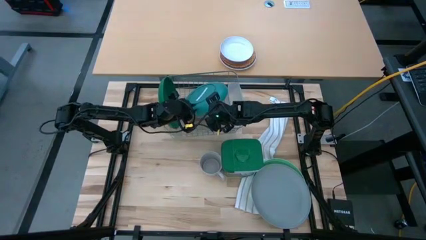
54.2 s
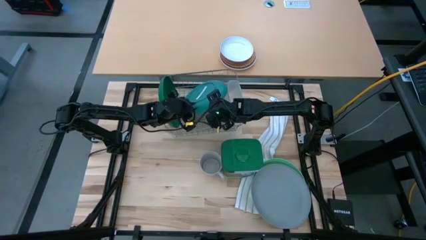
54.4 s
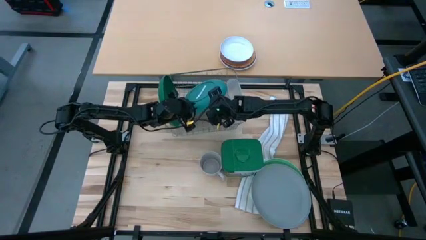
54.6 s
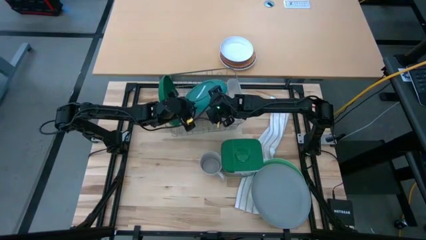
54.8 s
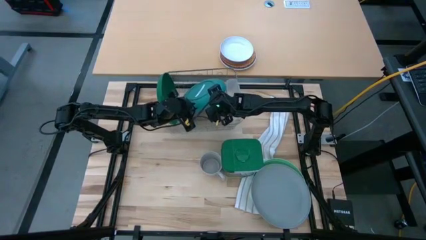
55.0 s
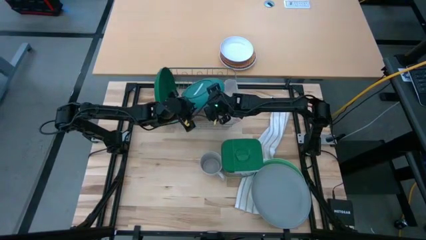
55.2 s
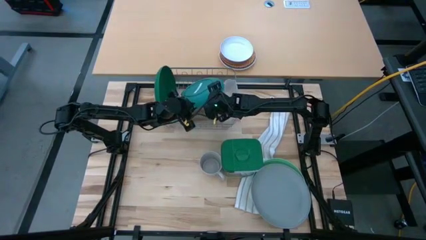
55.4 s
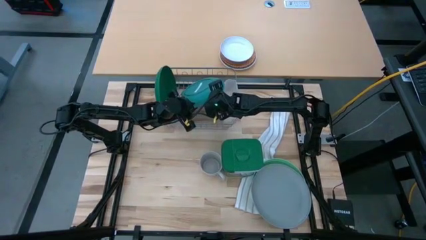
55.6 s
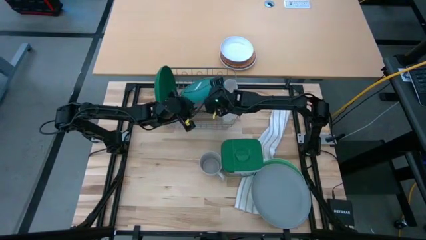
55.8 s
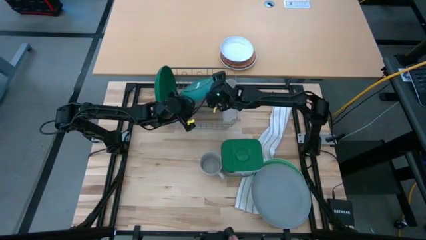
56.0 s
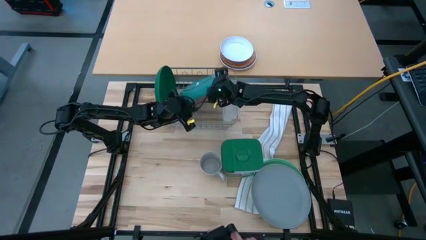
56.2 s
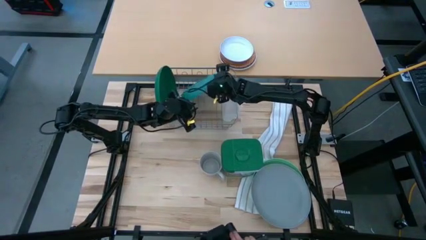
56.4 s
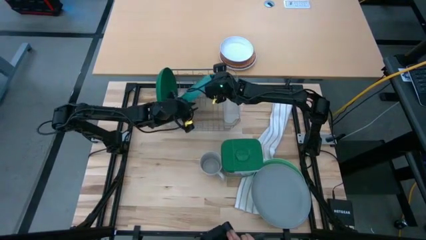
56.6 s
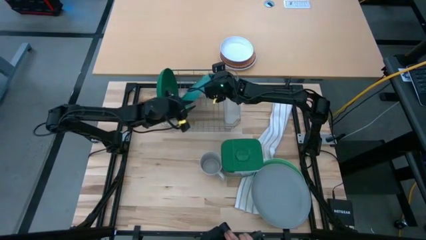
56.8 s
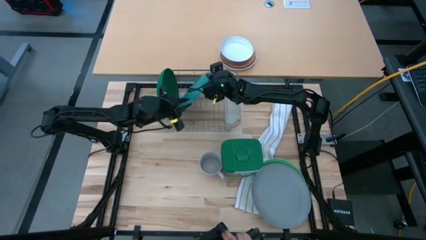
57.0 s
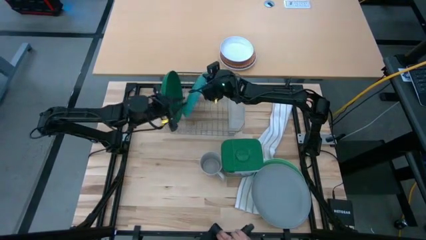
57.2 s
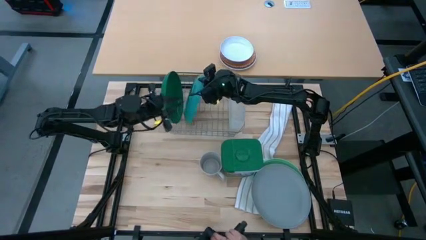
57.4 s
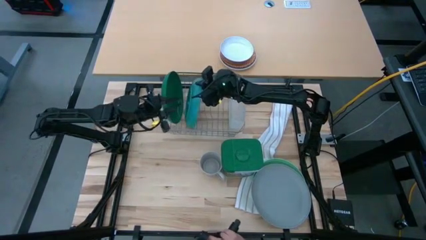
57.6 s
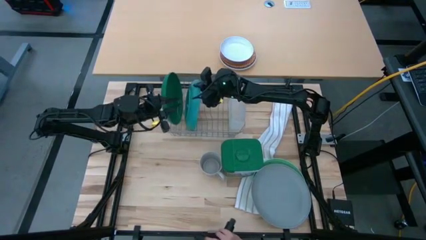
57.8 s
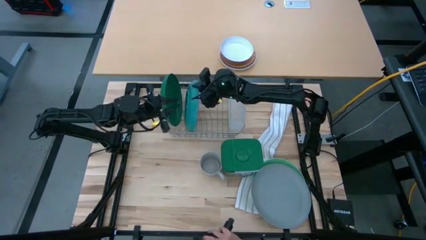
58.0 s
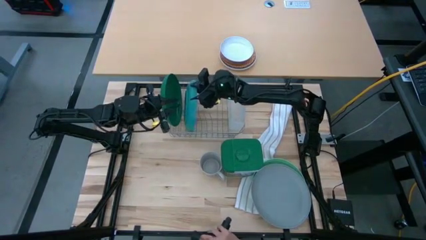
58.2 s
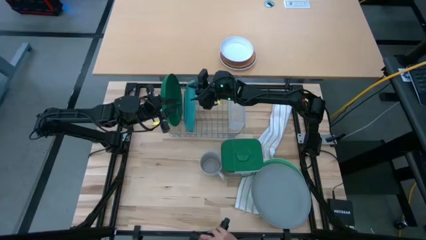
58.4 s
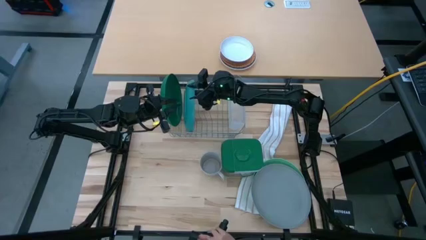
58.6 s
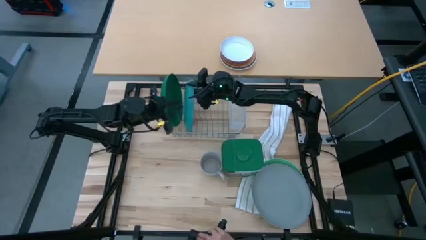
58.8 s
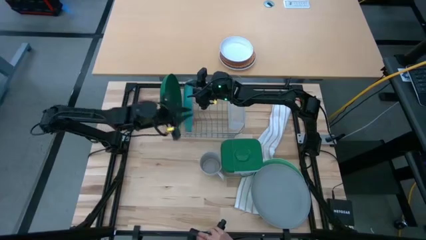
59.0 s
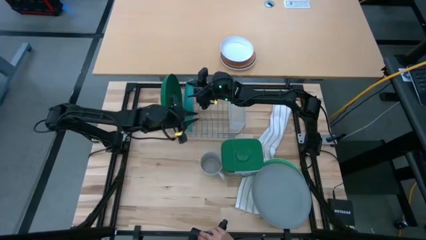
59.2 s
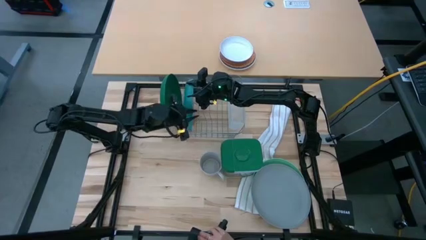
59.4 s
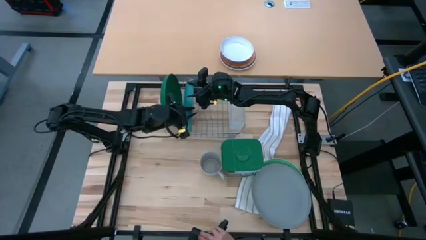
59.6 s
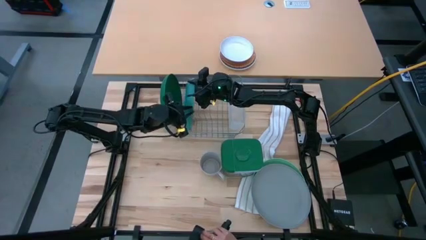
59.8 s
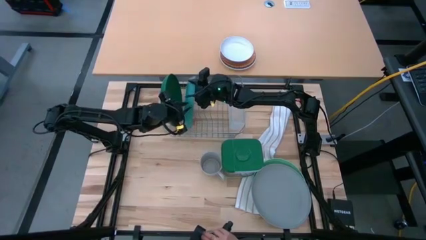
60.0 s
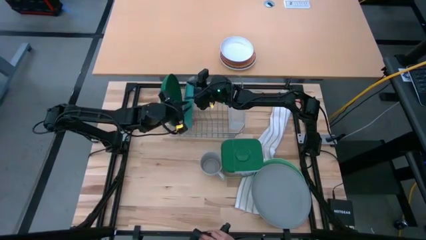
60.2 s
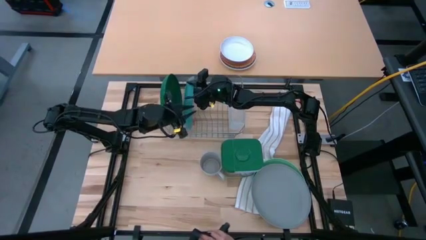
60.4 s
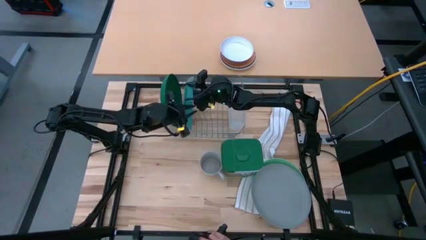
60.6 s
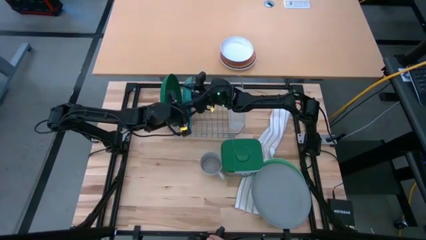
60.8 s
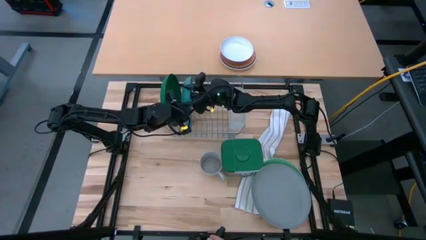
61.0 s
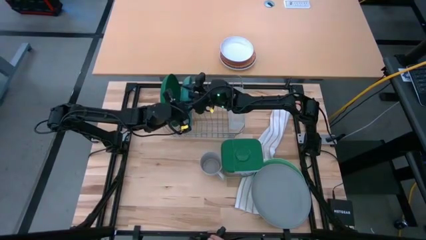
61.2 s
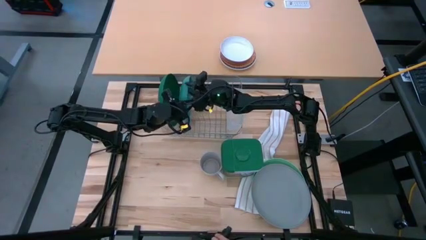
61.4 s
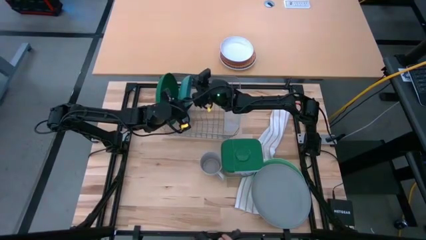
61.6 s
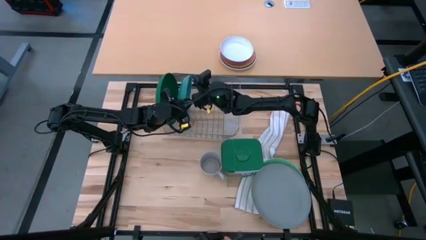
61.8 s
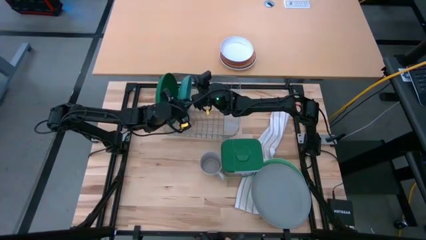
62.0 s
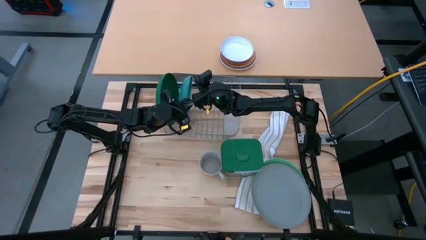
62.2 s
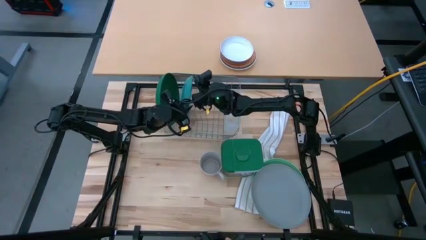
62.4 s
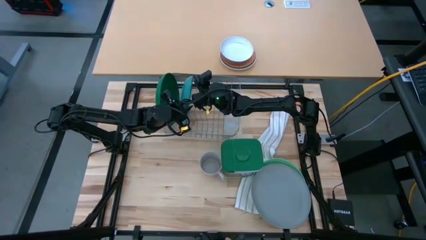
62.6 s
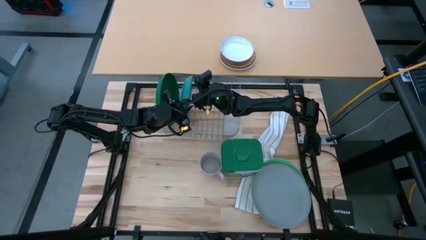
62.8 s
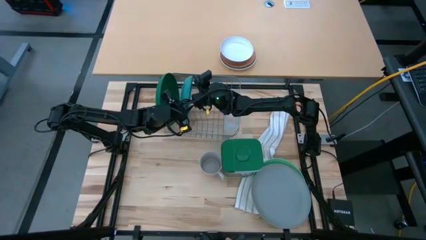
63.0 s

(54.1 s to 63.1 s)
Task: Sort dishes
Put the blue plate in the dish rack

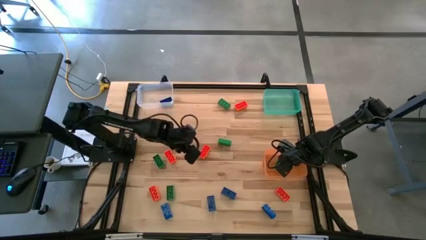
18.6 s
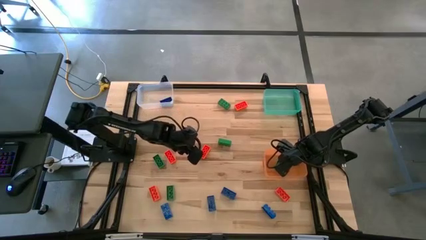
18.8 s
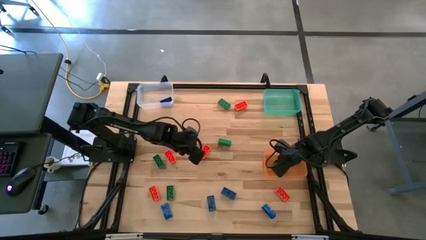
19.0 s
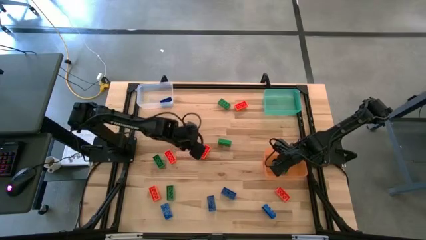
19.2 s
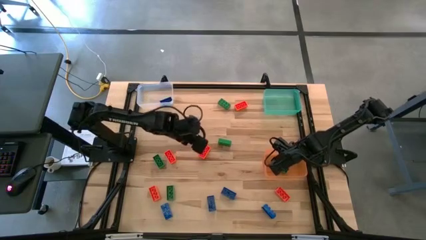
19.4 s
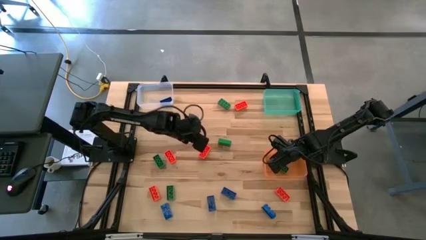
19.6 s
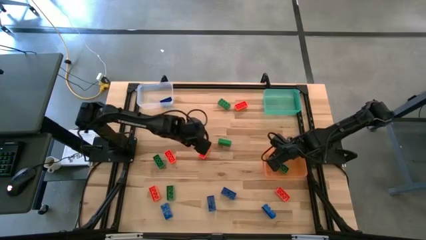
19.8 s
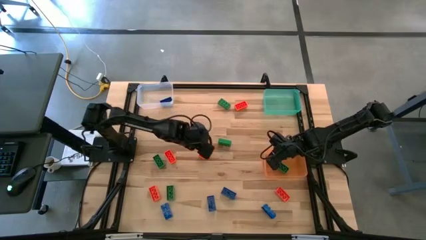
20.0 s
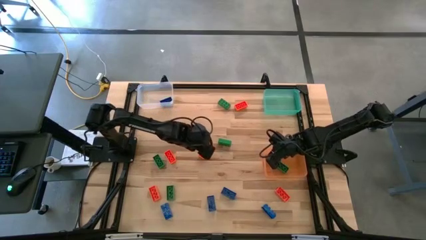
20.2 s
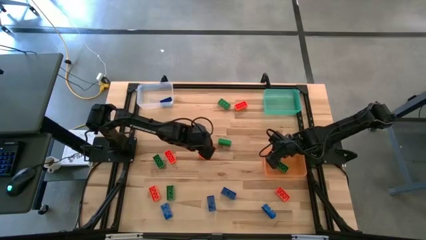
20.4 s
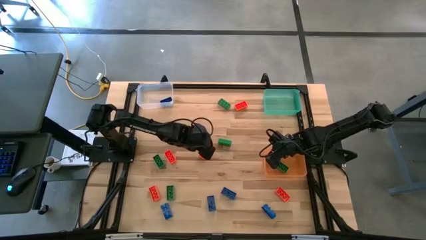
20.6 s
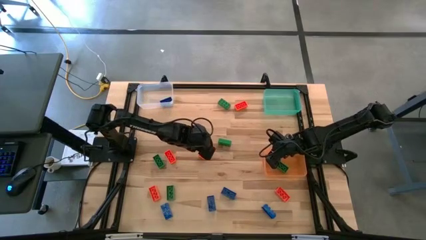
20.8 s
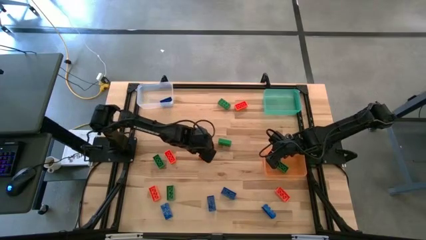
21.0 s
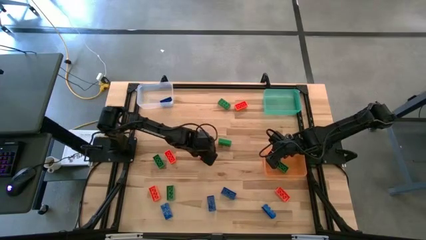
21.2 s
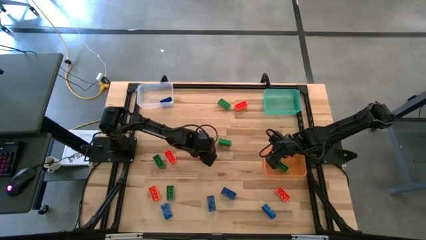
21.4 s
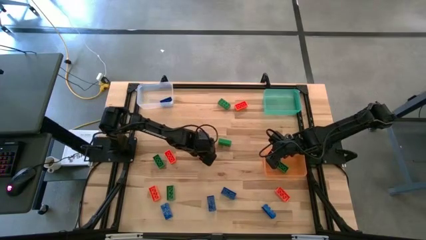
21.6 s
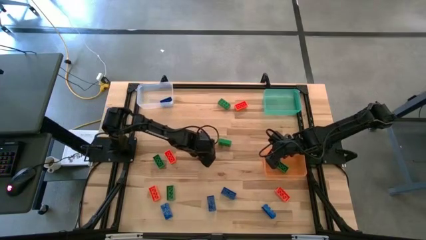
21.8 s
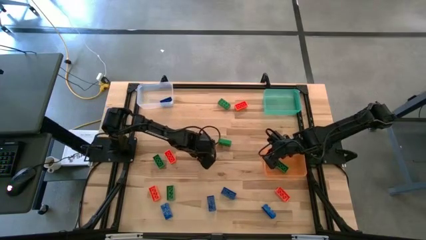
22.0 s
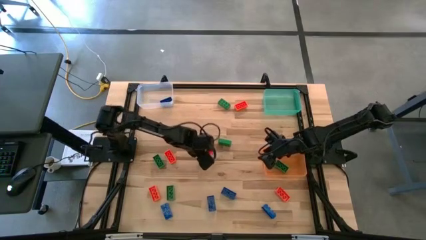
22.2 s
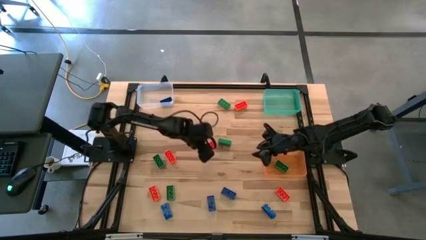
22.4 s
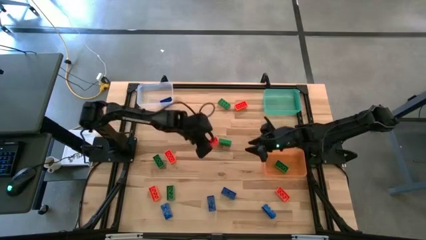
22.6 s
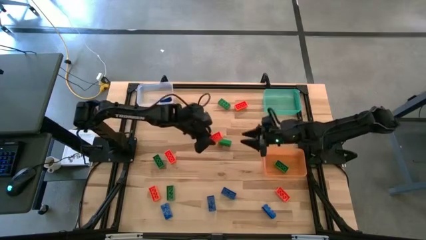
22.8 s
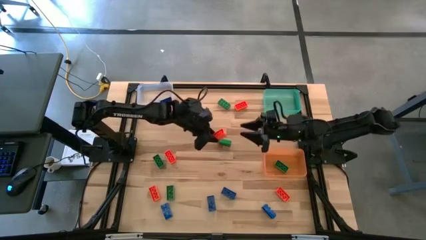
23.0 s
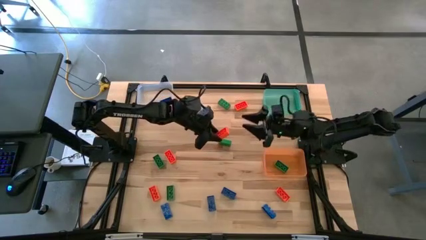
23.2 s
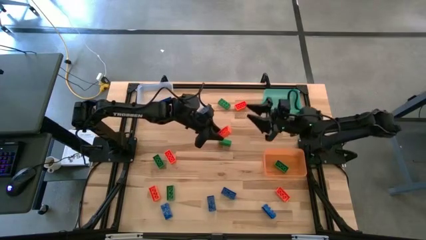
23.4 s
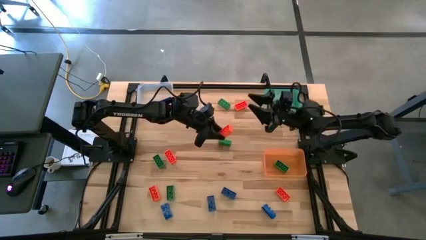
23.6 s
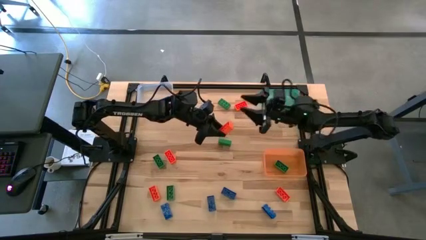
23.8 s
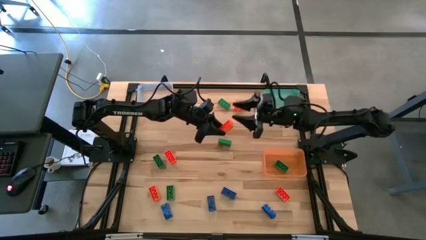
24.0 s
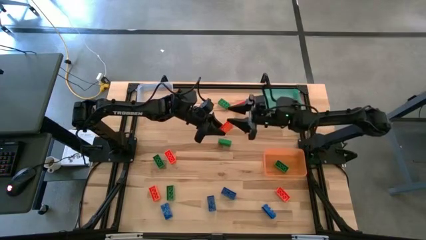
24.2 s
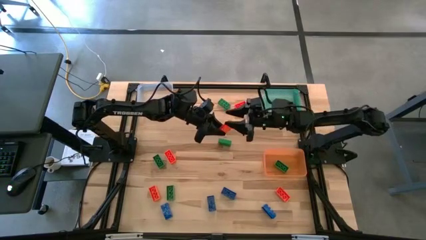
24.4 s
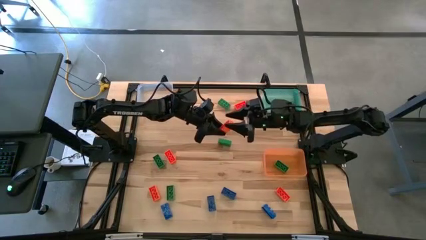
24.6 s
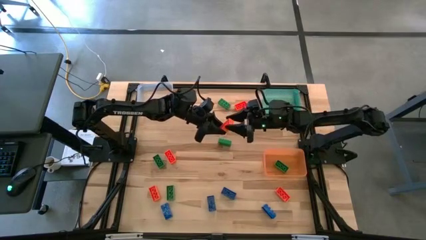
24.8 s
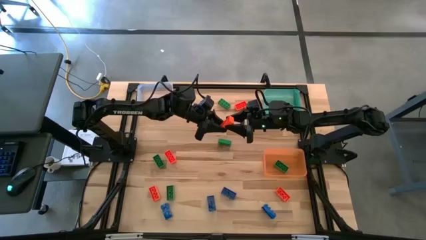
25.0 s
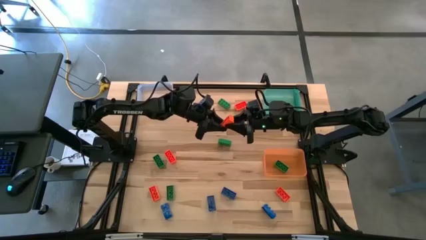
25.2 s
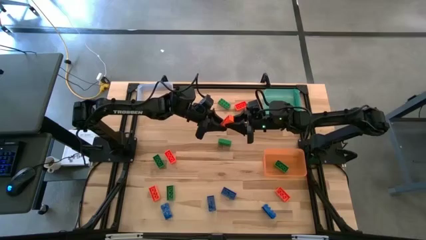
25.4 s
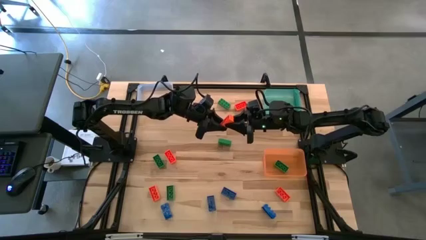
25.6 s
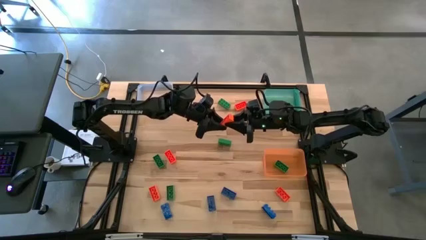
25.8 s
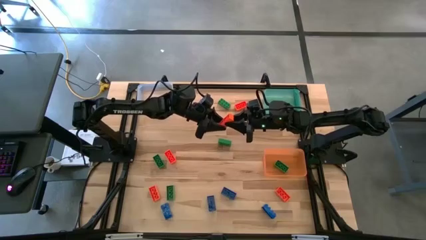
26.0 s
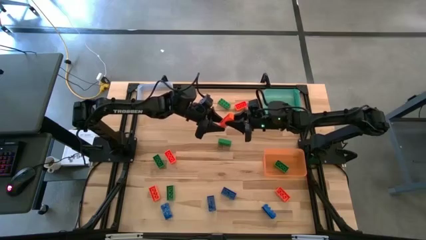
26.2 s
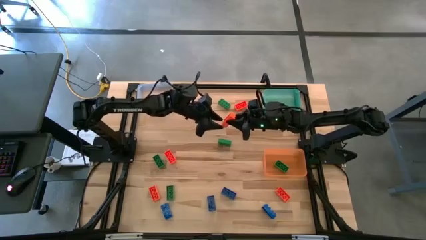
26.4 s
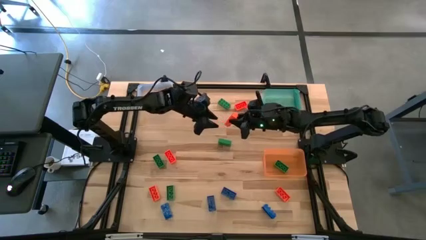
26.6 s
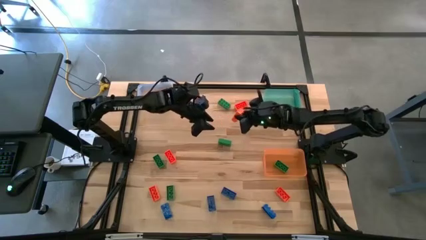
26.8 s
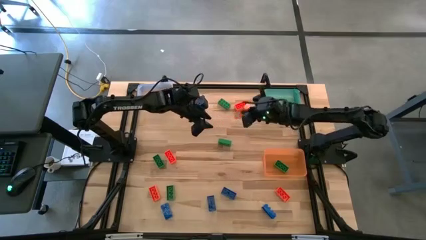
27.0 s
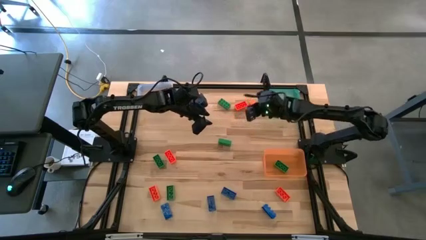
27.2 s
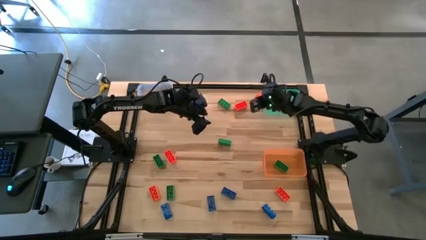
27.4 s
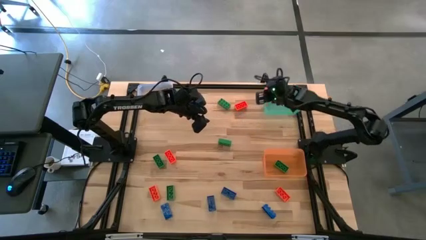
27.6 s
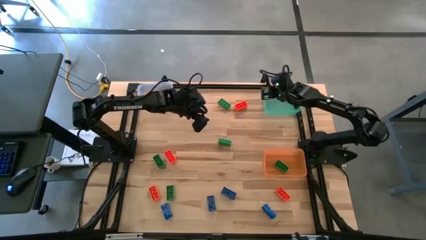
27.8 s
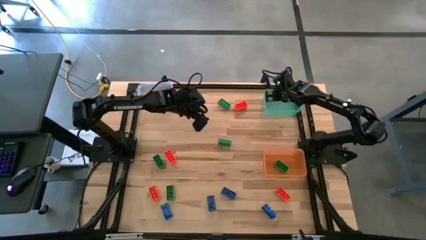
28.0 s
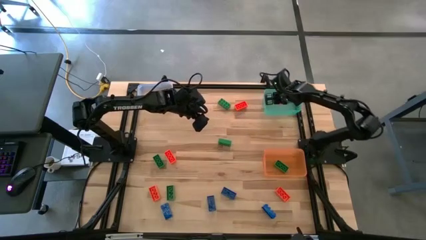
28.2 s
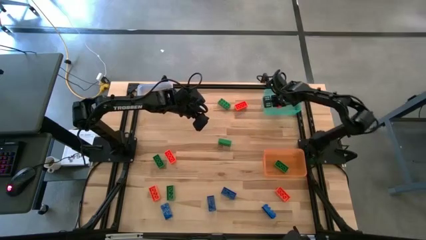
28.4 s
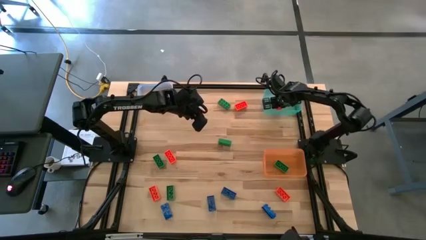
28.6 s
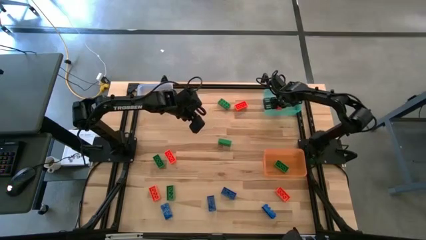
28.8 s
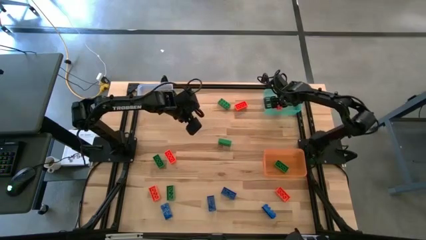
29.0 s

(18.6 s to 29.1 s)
Task: Sort & place blocks by color
Put the orange game piece into the green bin
